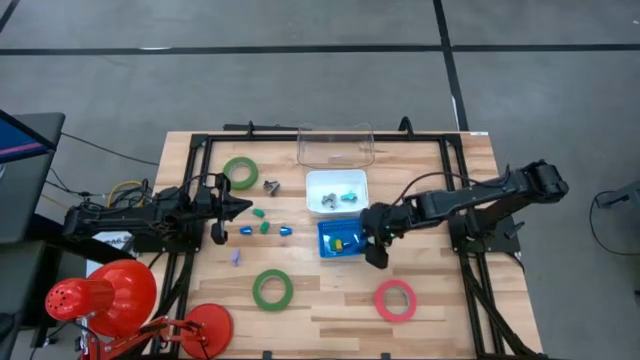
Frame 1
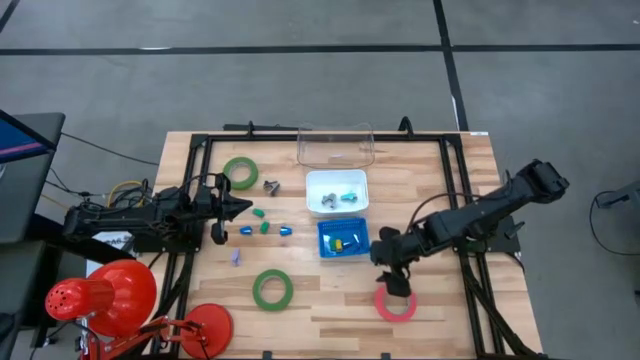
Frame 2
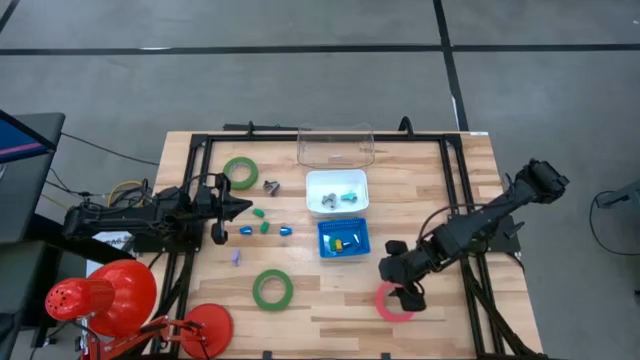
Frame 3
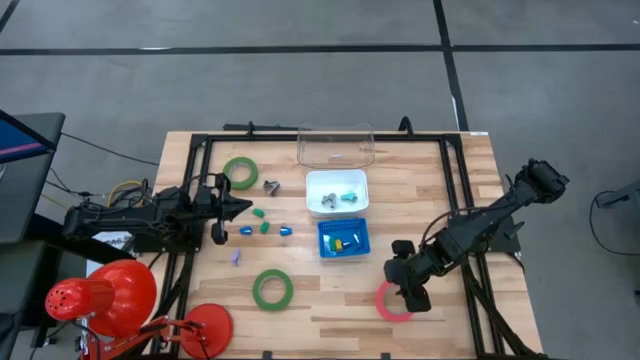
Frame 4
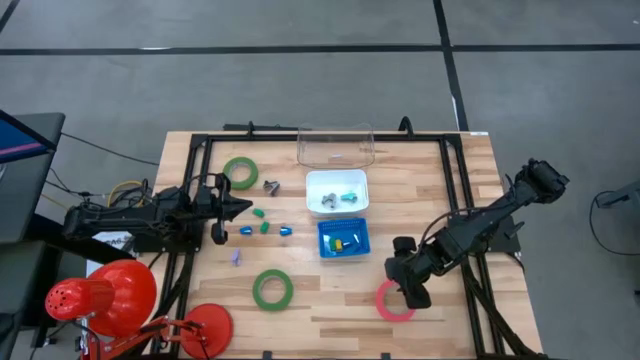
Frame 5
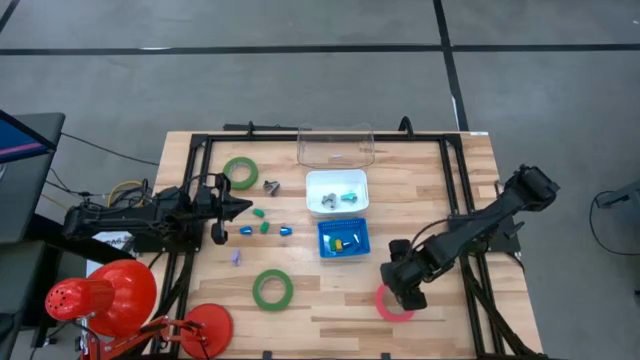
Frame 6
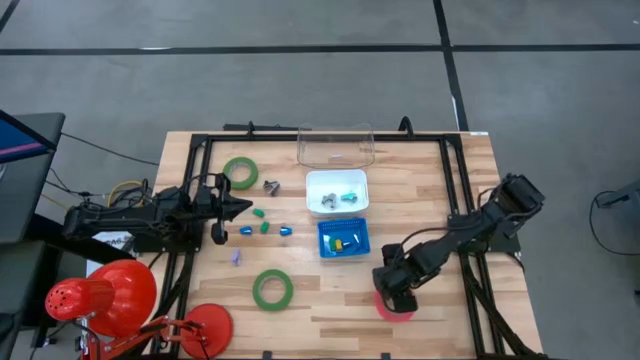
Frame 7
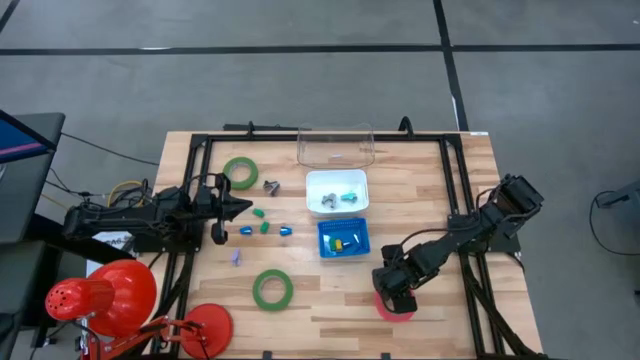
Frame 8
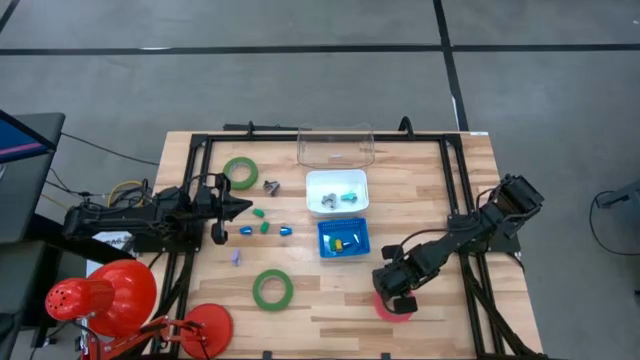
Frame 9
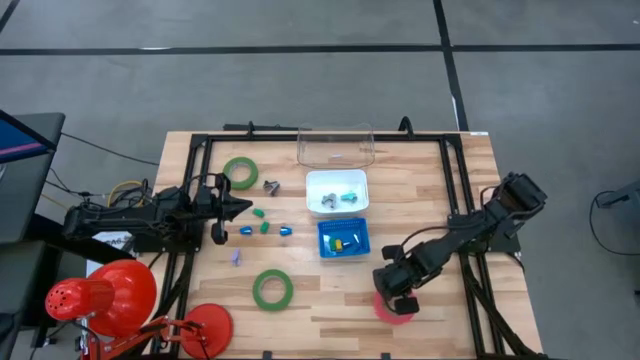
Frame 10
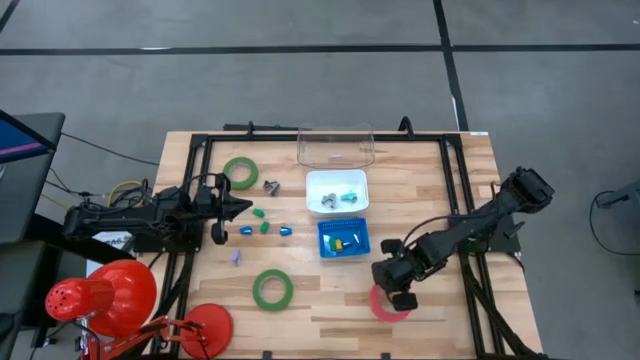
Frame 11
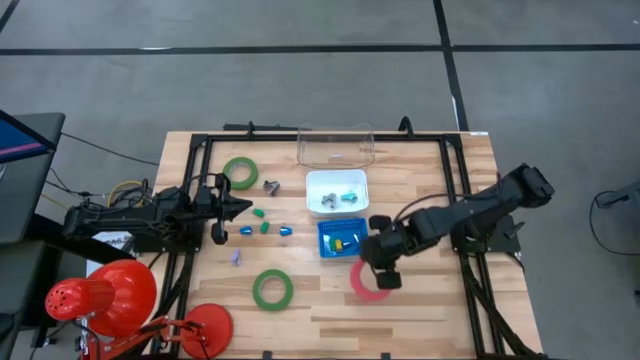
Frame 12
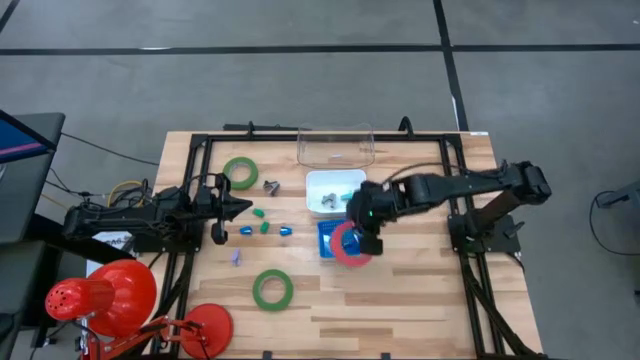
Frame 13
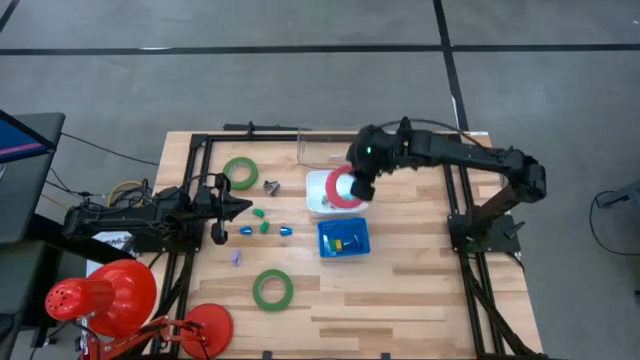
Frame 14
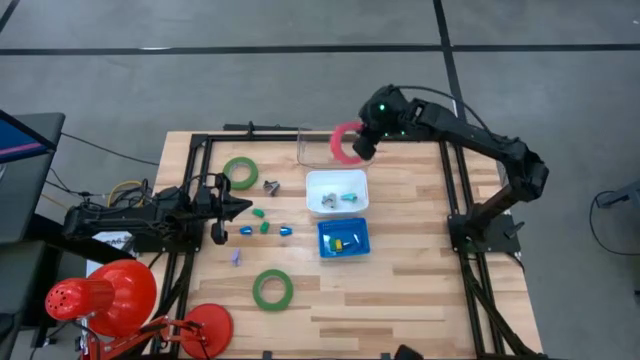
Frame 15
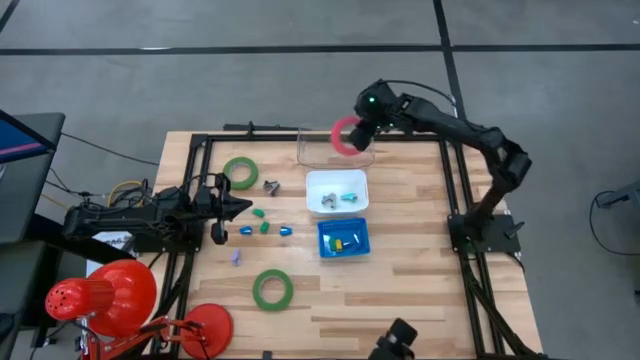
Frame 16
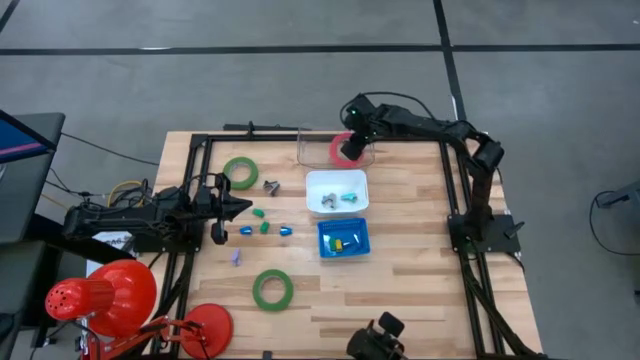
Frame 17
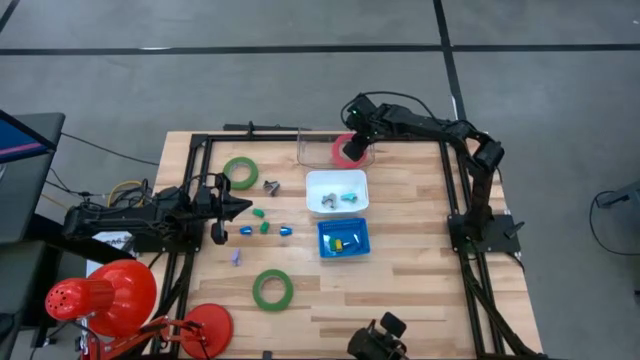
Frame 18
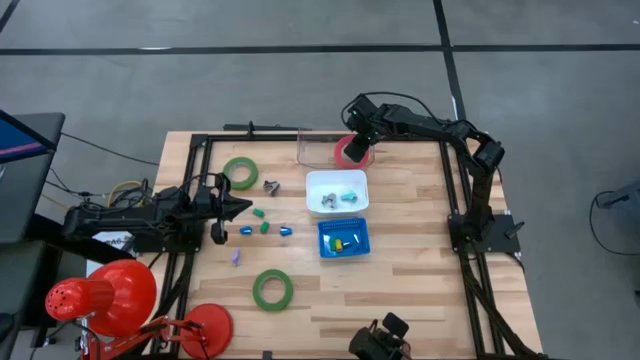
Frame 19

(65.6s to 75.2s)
Task: Pick and place Stapler, Stapler remover, tape
Put the pink tape into the transparent bin

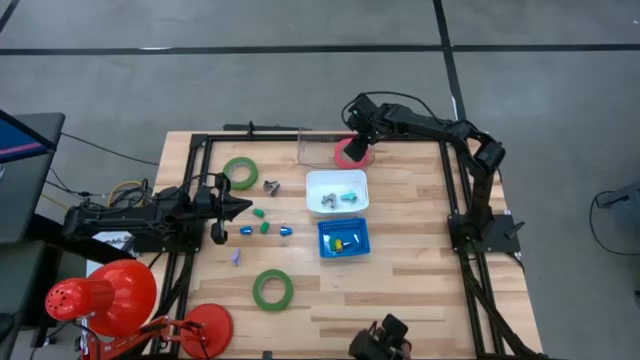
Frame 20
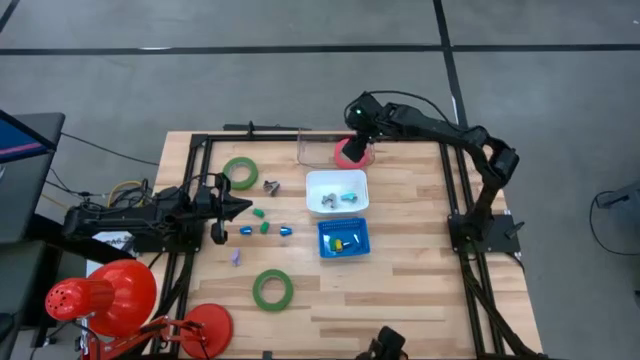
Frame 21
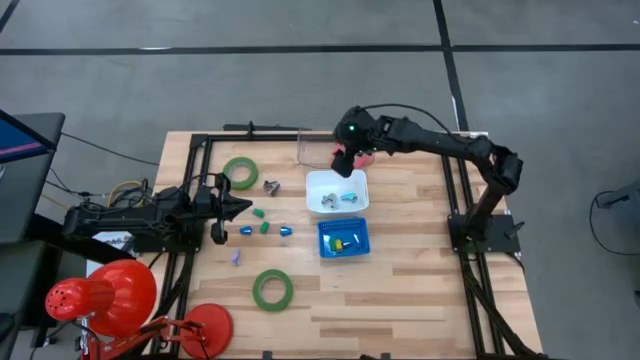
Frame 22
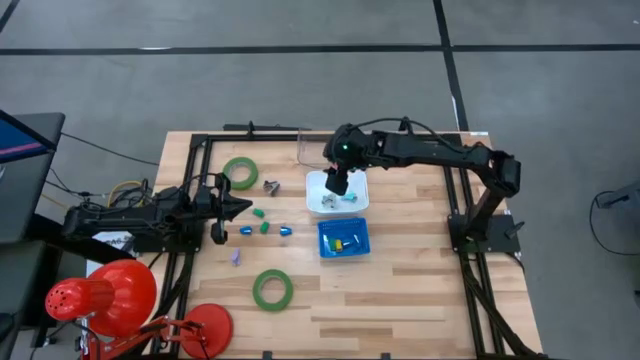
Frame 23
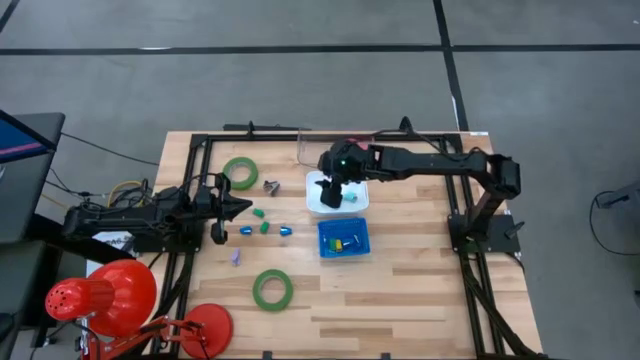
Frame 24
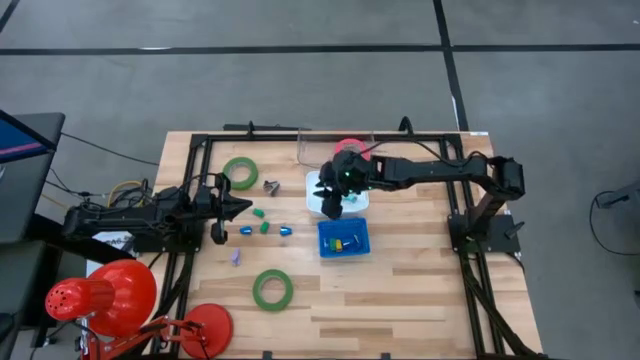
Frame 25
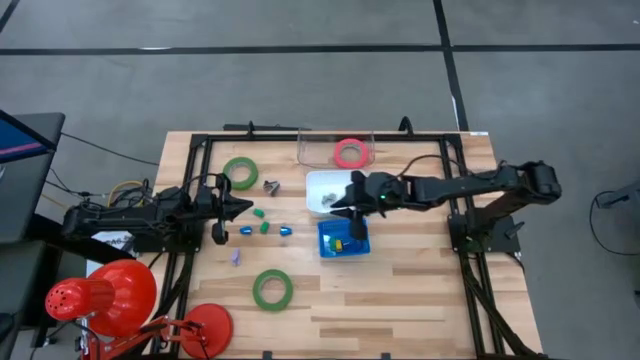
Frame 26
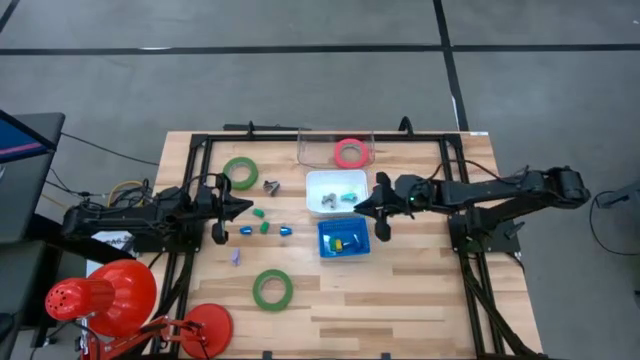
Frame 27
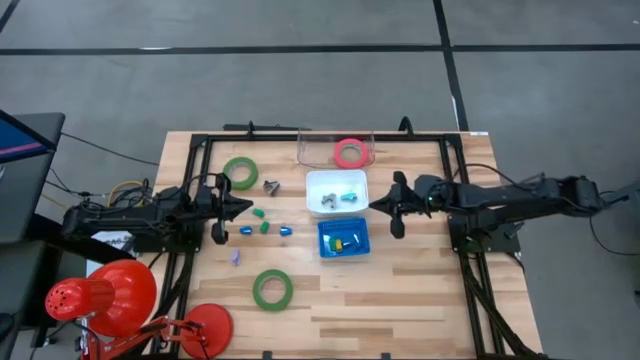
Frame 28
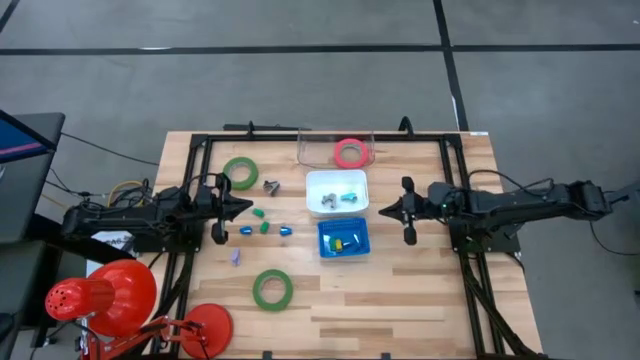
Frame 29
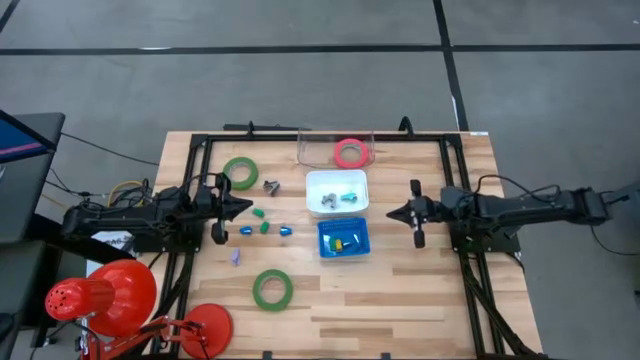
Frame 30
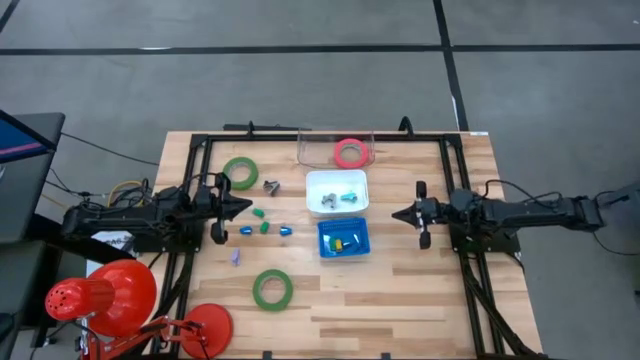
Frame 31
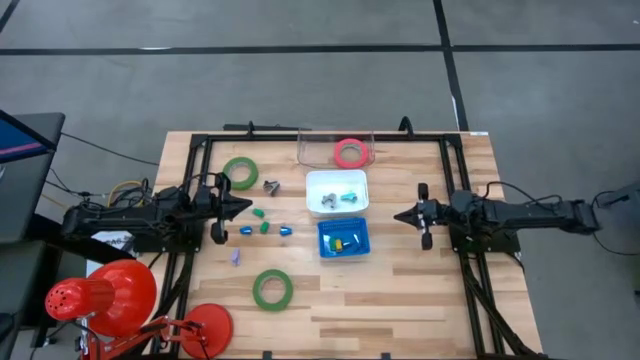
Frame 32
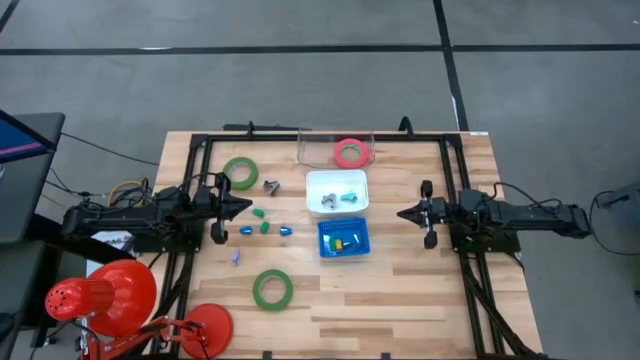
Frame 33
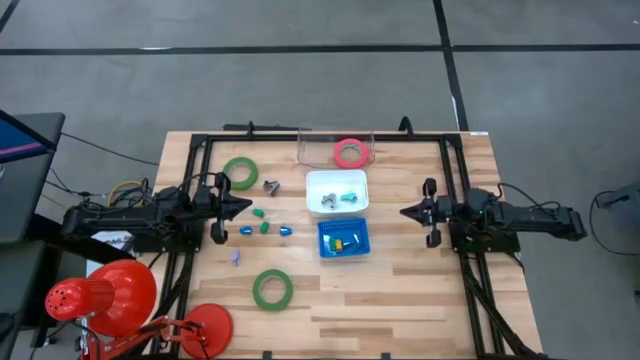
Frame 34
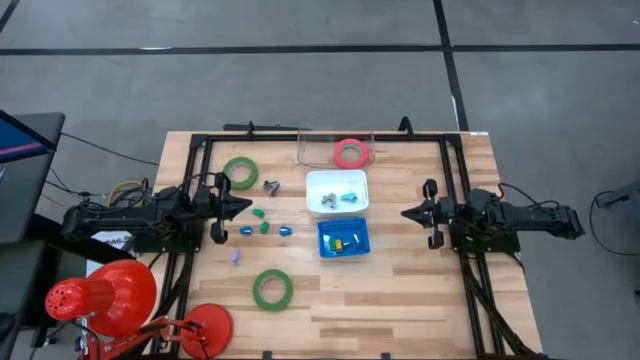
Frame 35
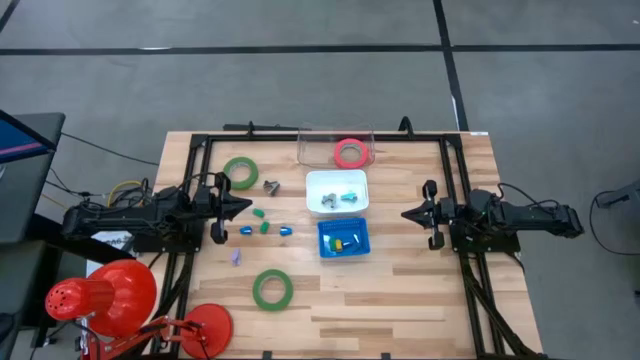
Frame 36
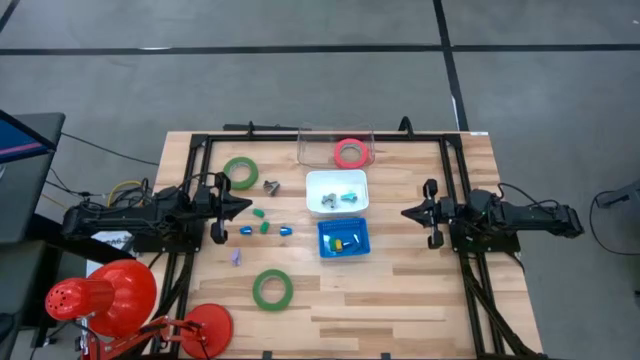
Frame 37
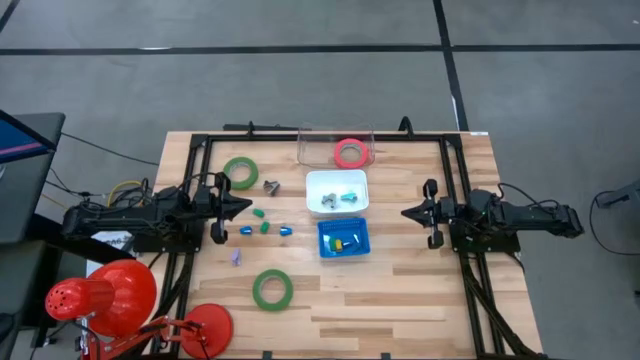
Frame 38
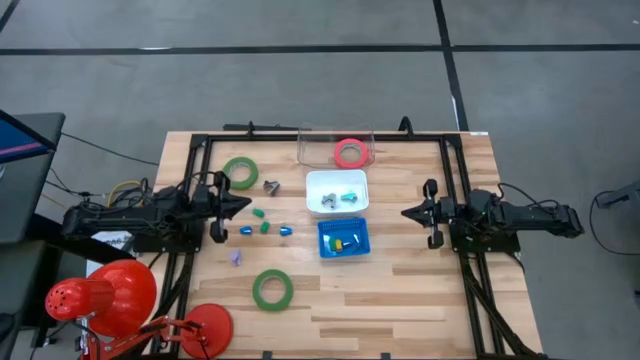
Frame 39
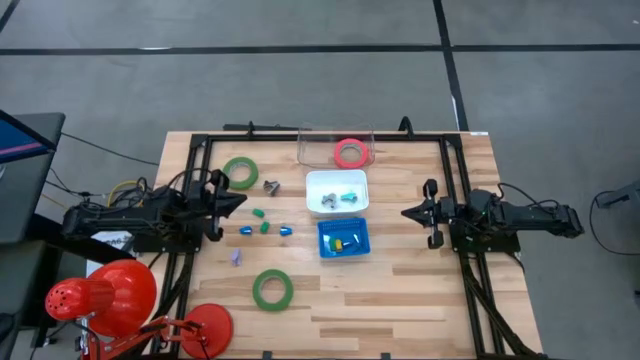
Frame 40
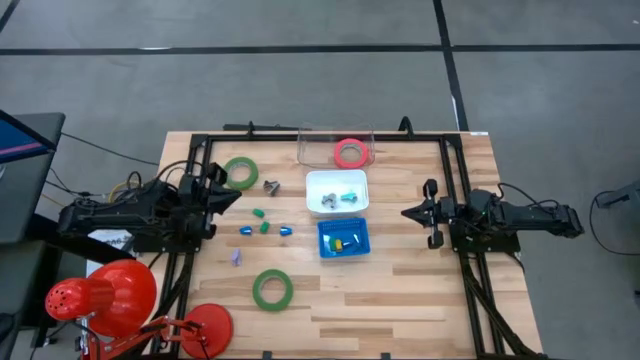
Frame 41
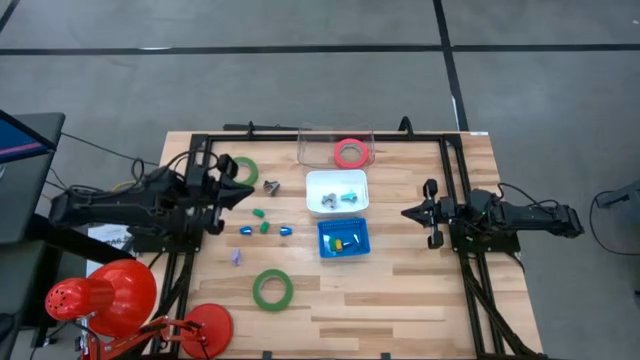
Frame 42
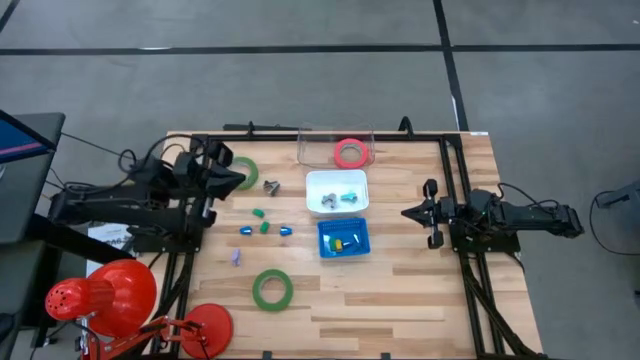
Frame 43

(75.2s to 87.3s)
Put the top green tape into the transparent bin

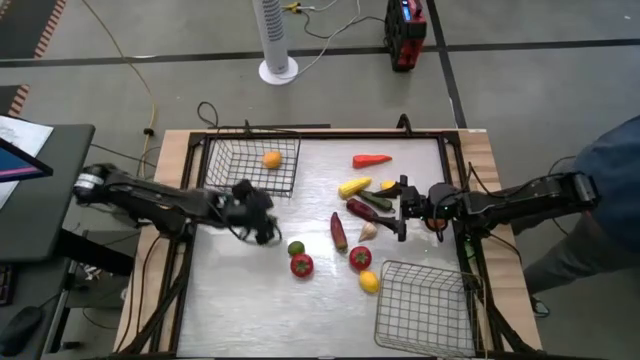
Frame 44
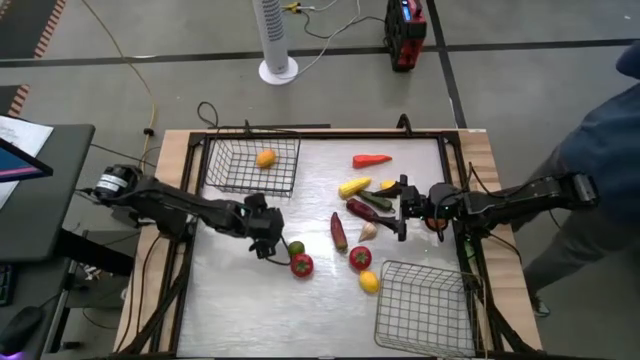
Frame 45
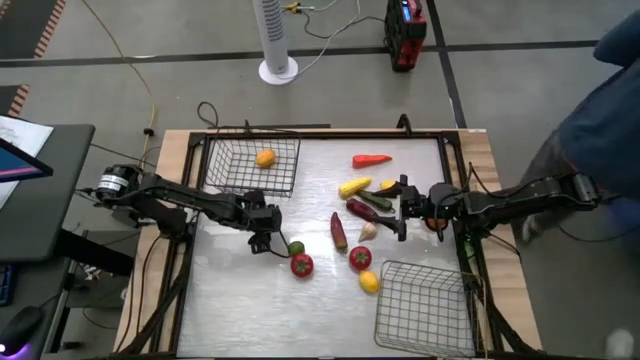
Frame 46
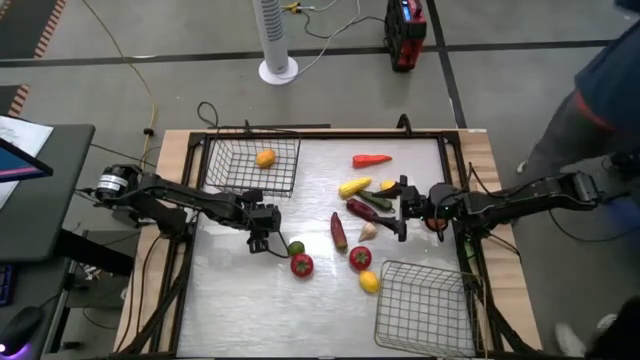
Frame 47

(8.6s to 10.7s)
Task: Sort produce into baskets
Put the top lime into the black wire basket
